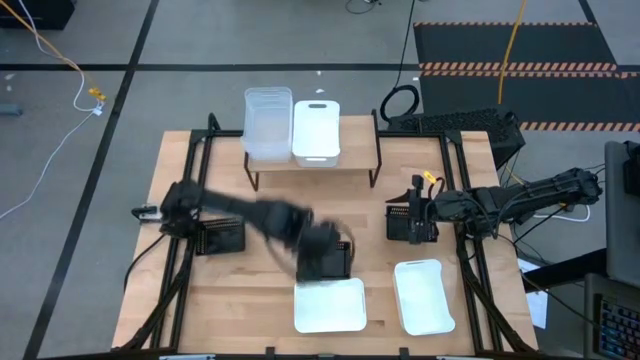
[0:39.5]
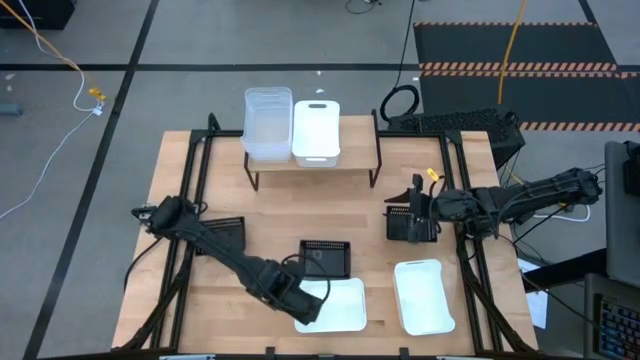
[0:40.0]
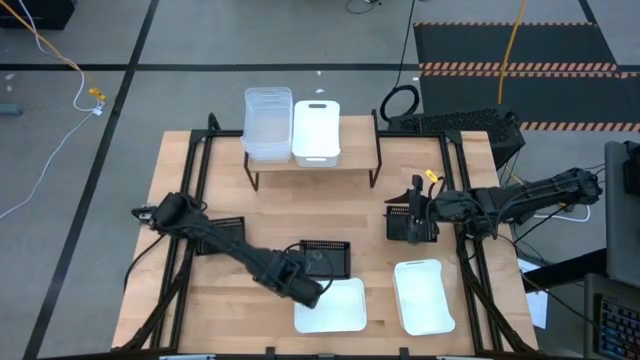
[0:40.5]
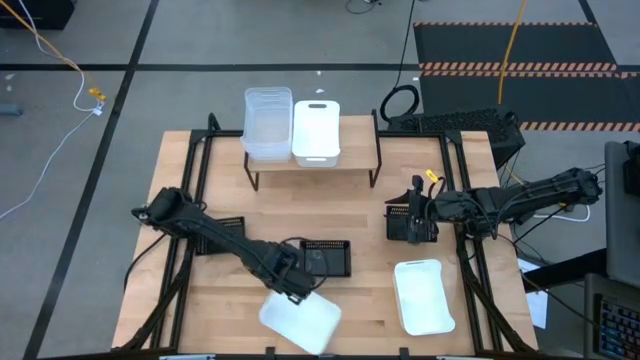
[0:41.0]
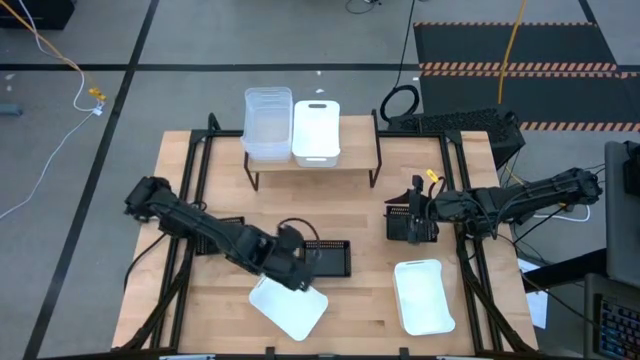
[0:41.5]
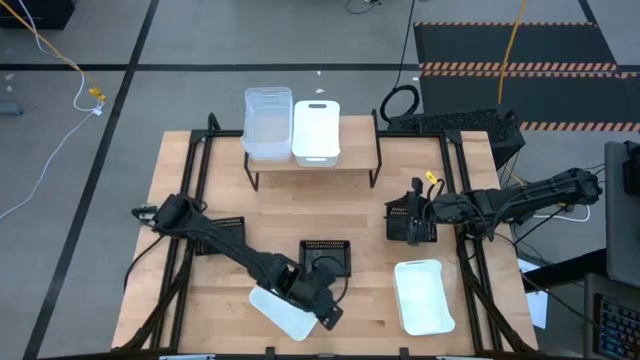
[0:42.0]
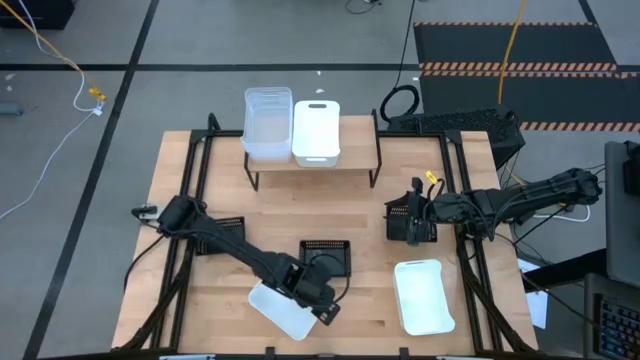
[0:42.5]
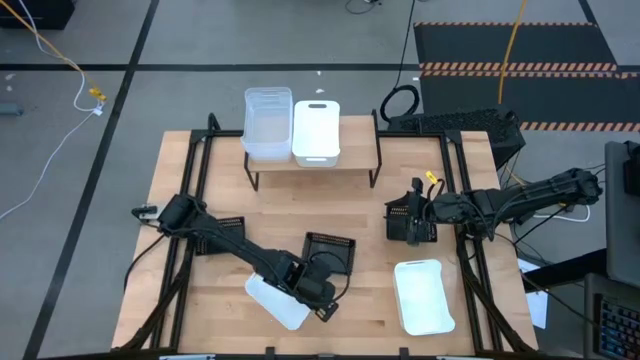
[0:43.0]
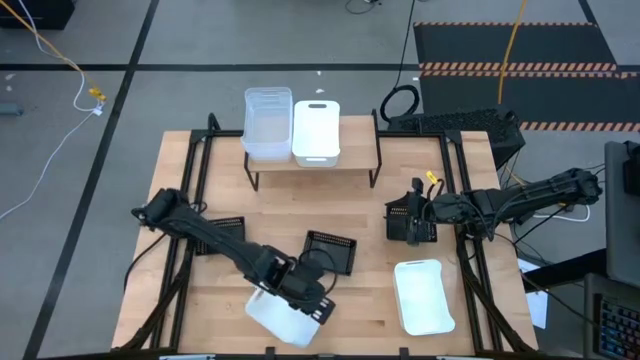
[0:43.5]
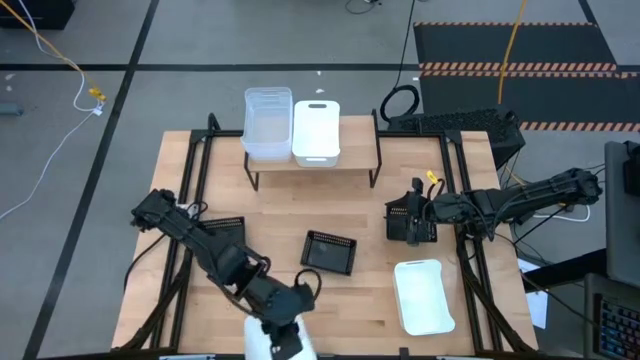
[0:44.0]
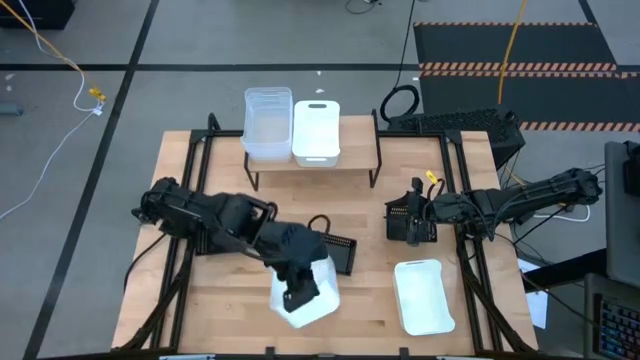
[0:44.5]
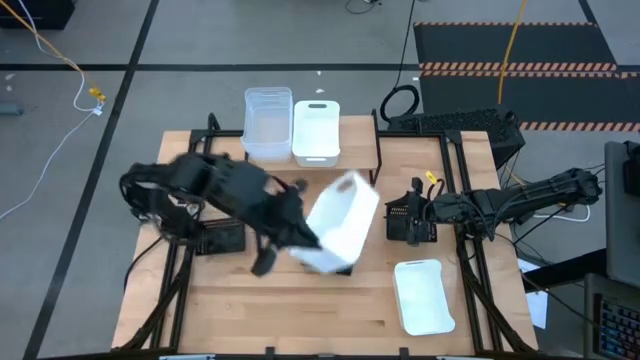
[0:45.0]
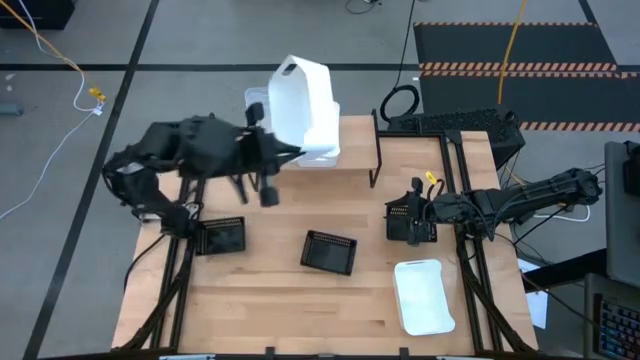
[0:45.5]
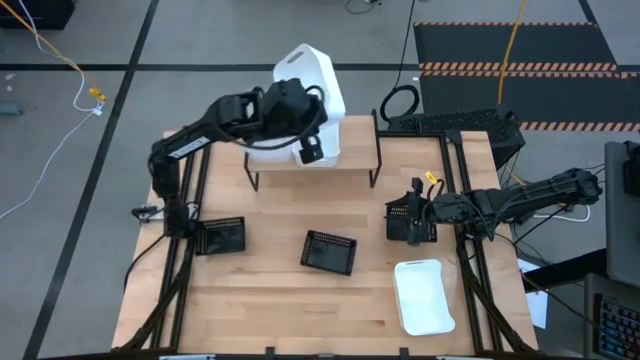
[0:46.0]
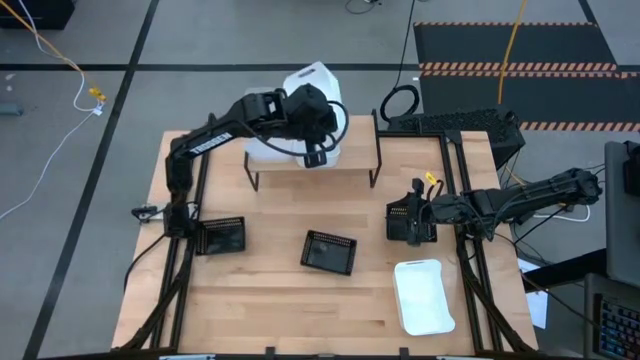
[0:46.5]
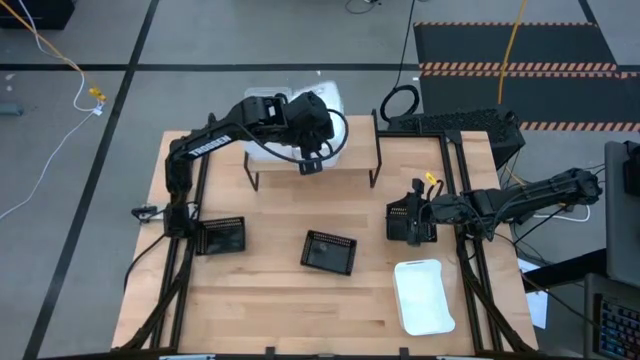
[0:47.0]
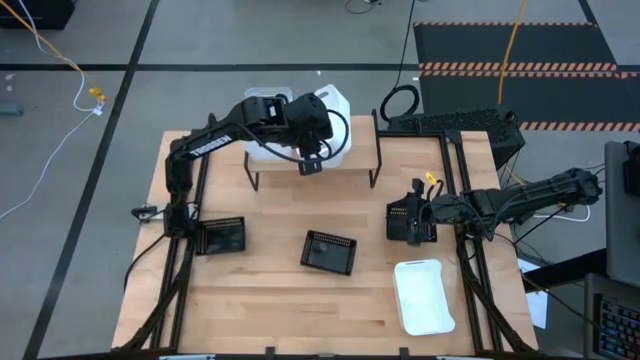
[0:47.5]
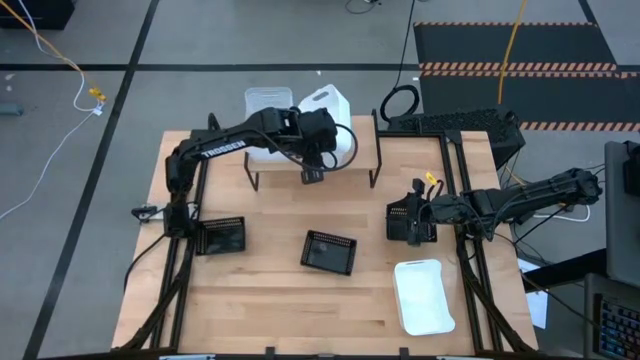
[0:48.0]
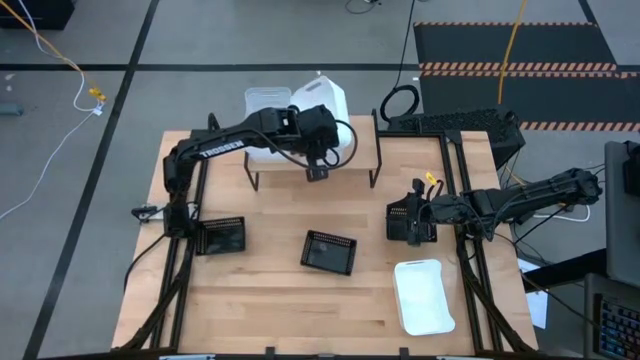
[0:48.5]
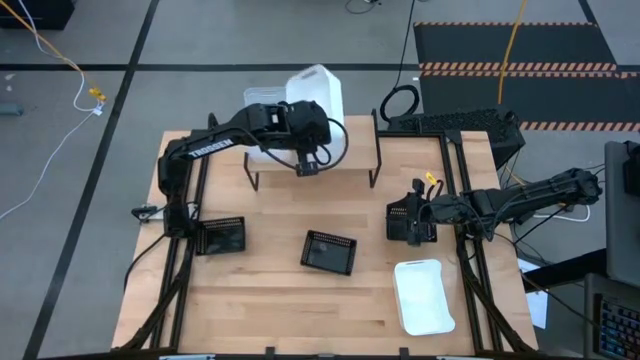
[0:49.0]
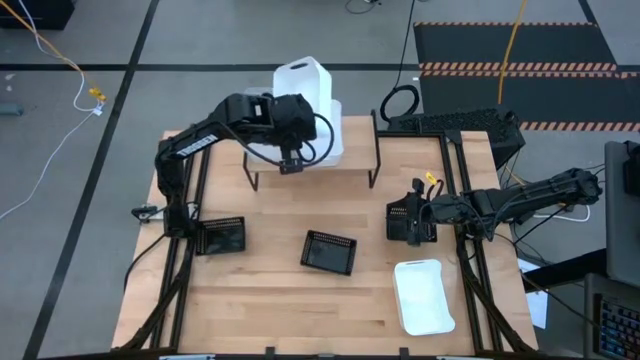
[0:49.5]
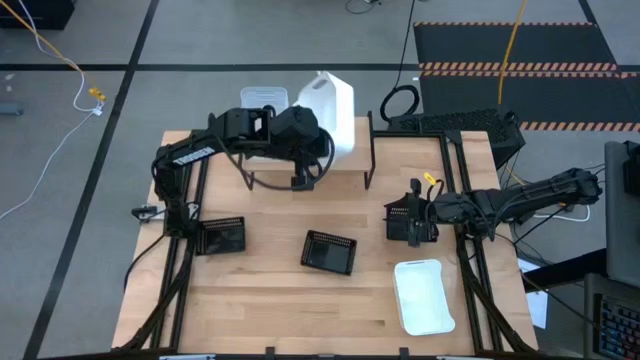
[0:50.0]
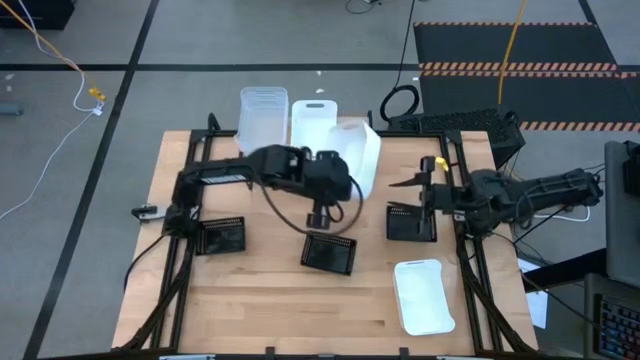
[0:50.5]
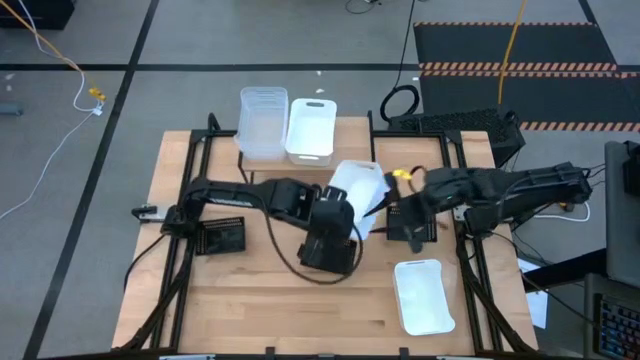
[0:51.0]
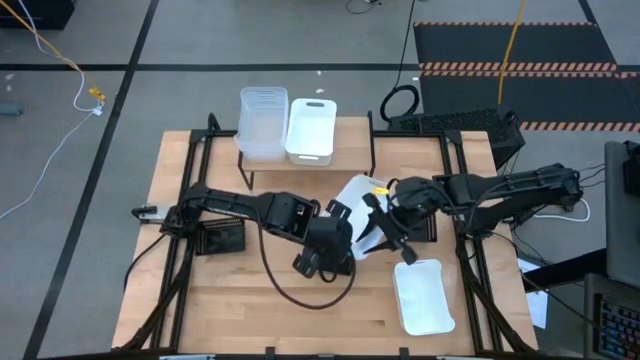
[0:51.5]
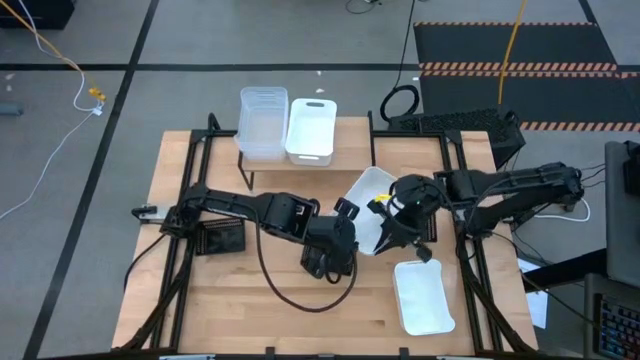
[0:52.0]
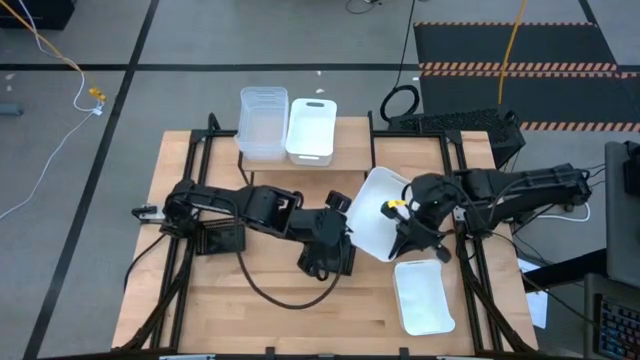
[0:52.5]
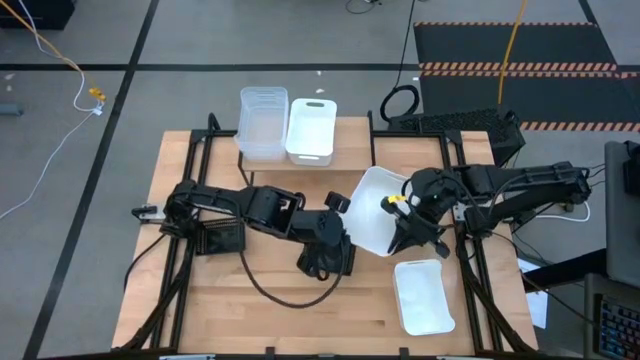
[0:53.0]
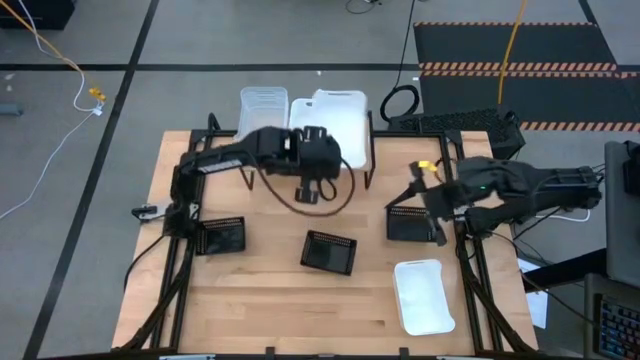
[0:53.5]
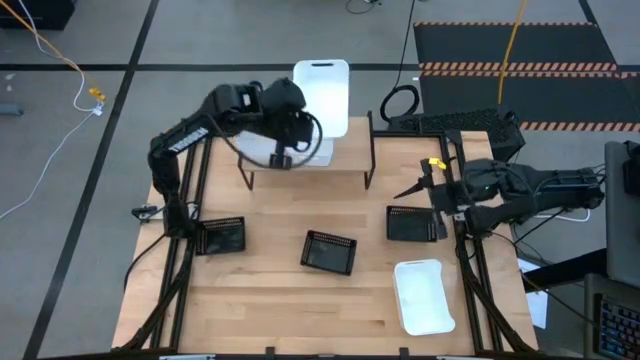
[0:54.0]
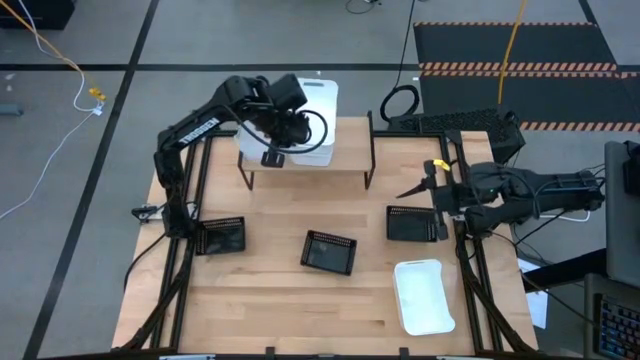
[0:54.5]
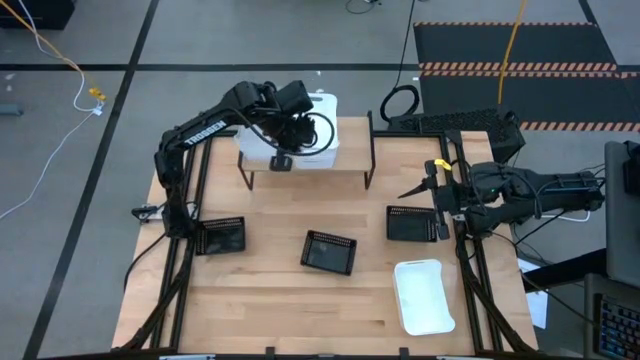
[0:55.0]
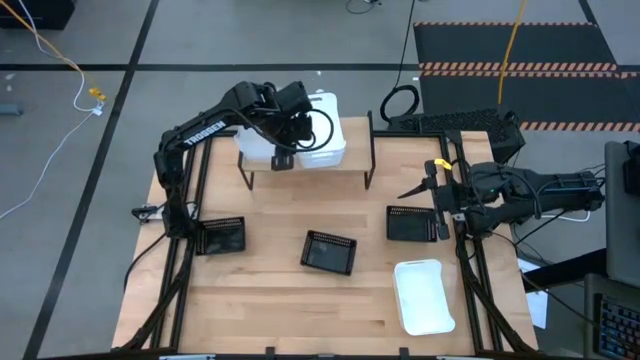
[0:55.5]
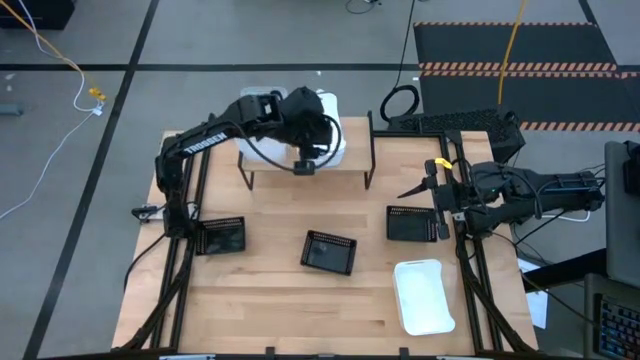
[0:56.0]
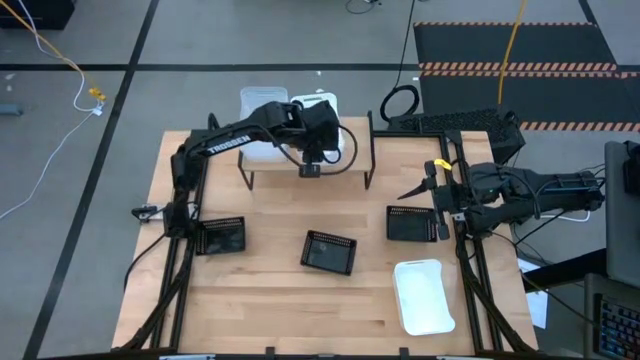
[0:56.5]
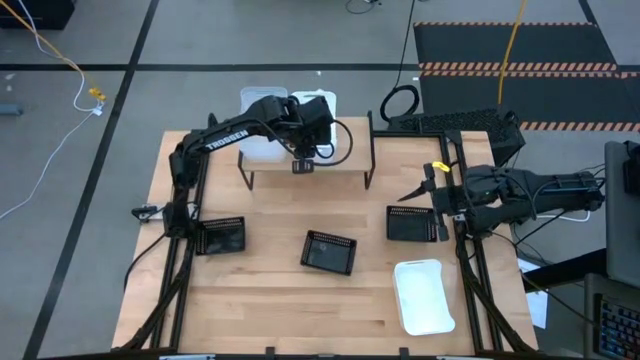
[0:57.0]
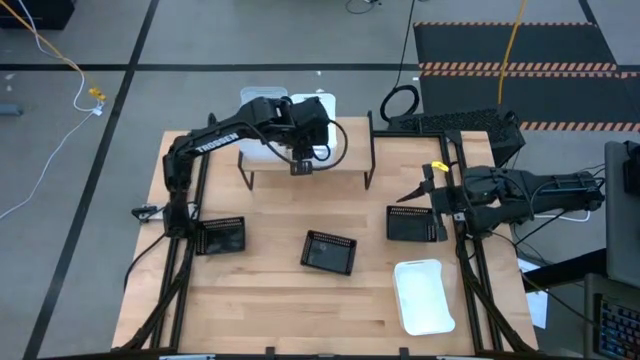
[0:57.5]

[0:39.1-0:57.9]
Task: Stack baskets on shelf by color
Stack the left white bin on top of the white bin on the shelf
